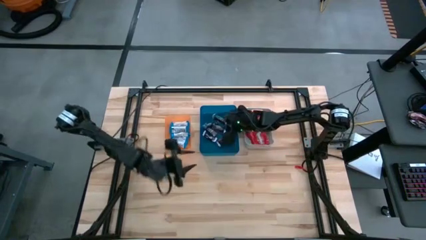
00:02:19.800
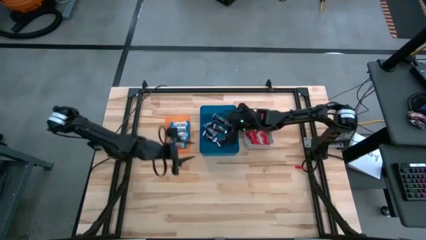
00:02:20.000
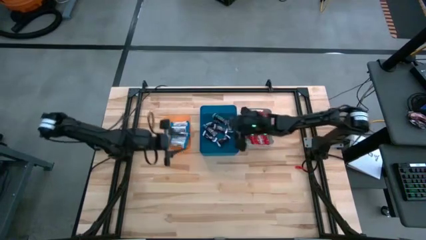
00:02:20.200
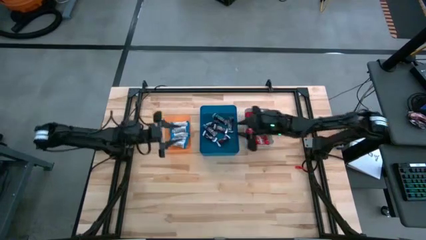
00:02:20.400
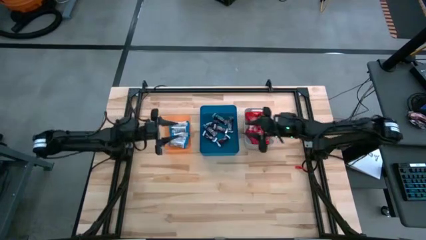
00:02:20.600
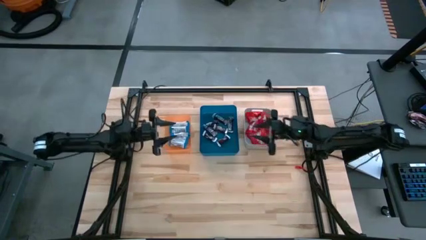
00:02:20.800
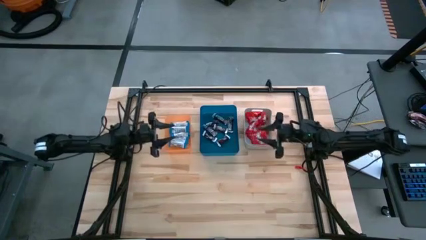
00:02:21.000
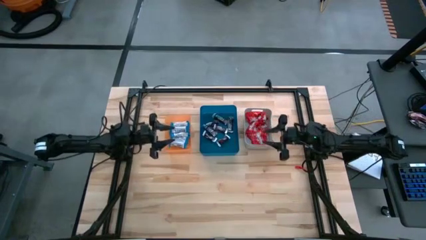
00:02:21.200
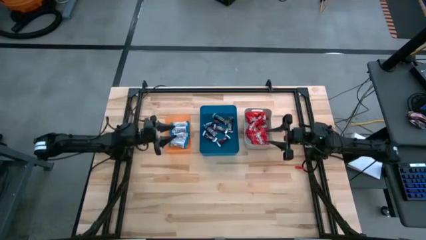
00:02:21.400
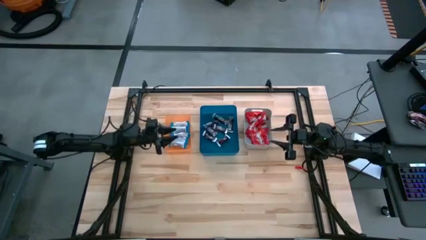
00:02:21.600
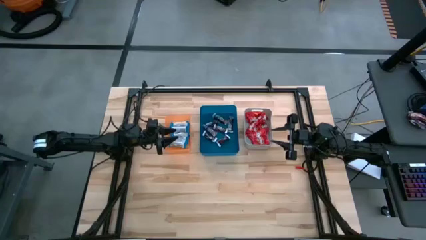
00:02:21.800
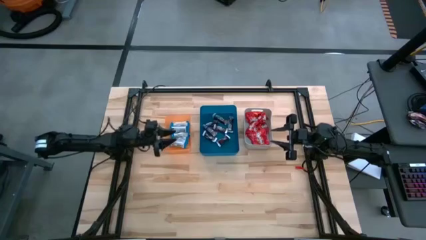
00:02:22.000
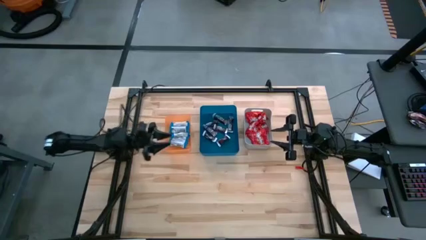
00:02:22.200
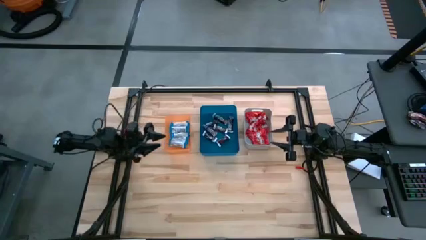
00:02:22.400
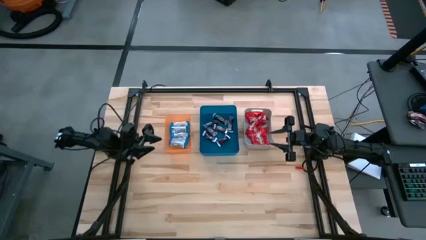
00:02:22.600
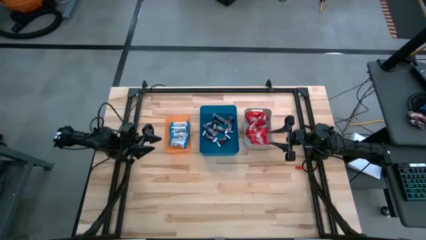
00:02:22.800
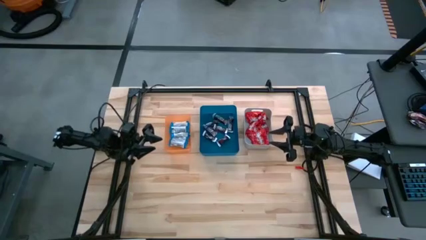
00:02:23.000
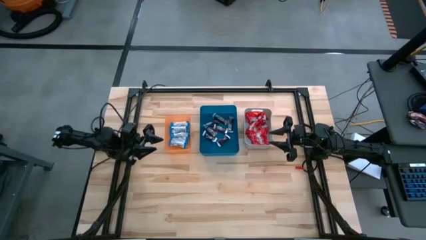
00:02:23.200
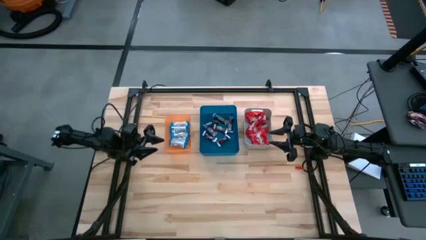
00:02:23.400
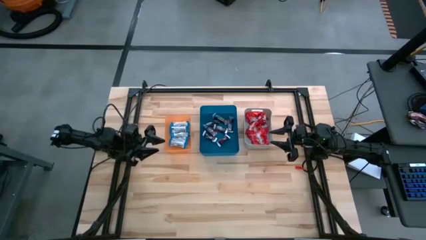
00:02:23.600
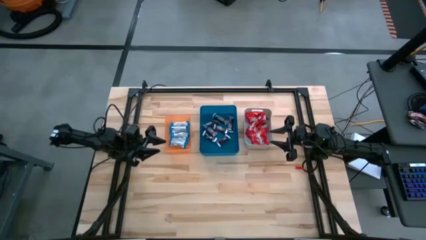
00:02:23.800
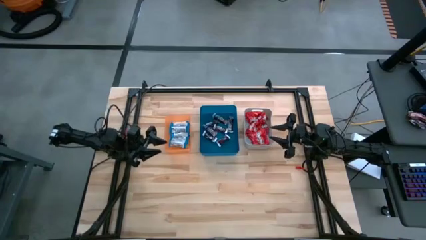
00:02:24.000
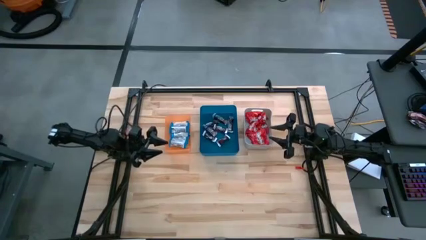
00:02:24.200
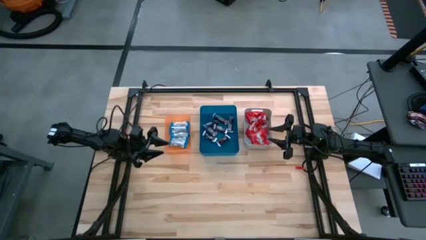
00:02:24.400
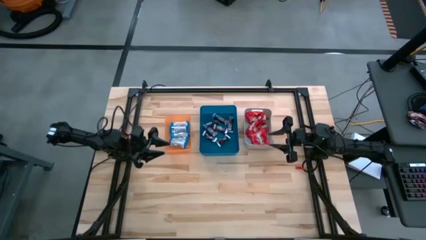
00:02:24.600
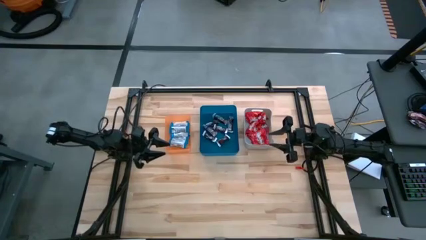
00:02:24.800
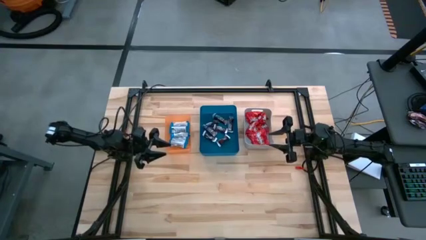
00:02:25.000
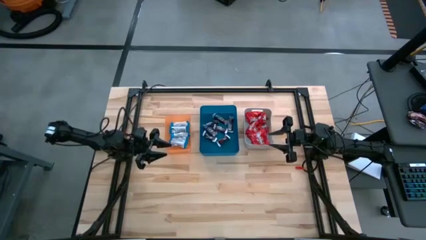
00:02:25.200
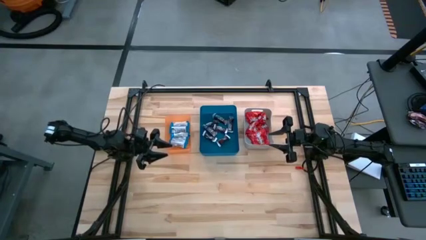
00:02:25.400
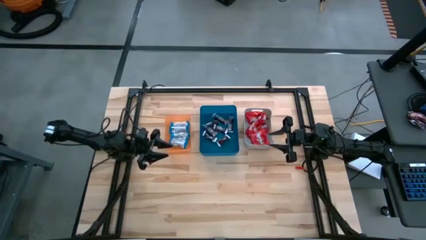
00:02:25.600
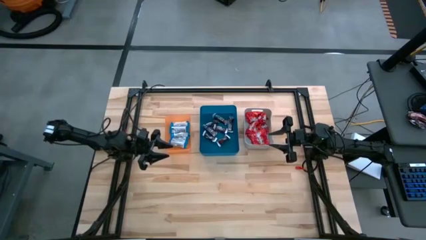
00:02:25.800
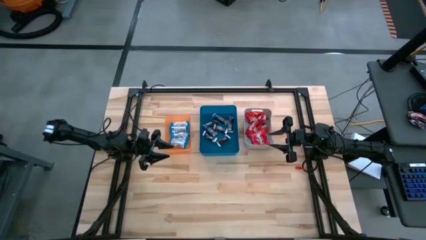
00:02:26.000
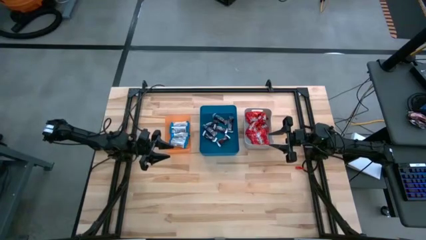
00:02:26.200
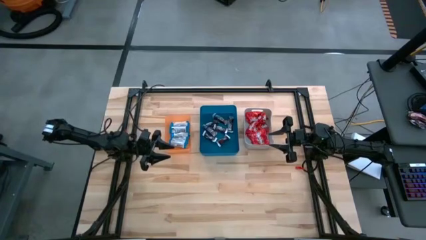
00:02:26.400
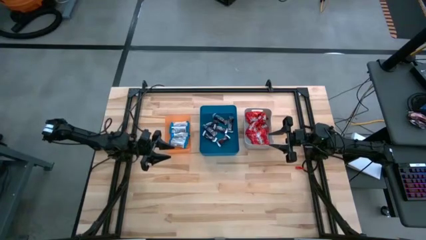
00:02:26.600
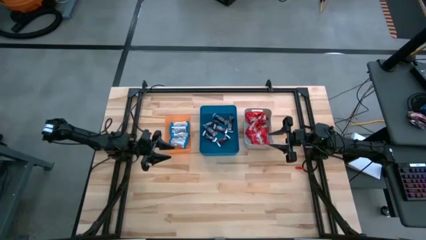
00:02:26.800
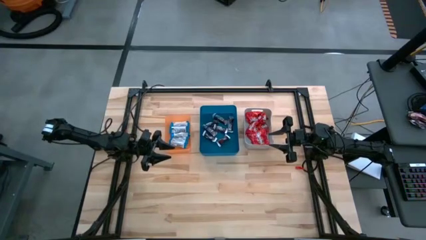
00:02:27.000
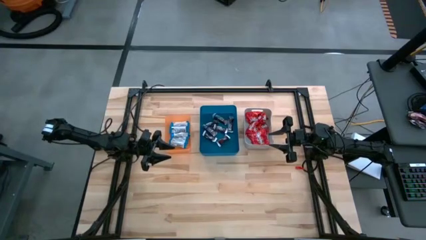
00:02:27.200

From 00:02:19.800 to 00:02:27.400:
Task: Sort candy
Return to Home Position

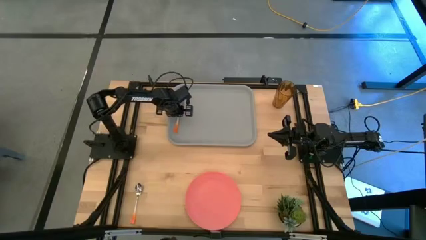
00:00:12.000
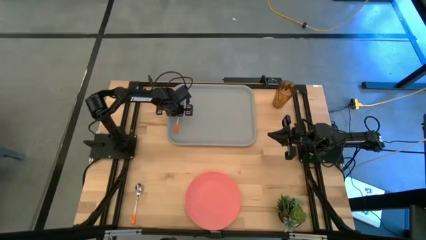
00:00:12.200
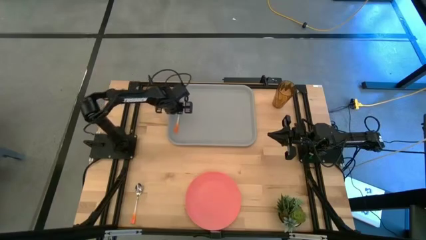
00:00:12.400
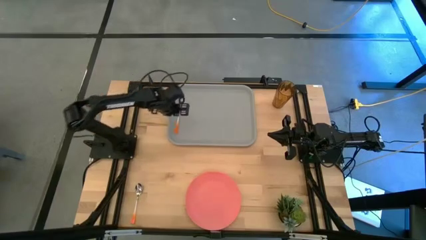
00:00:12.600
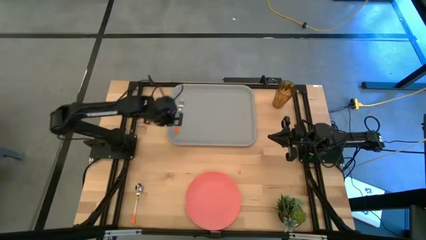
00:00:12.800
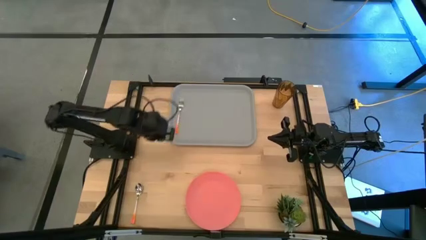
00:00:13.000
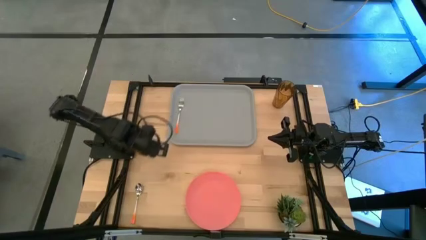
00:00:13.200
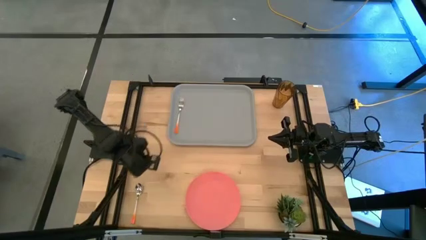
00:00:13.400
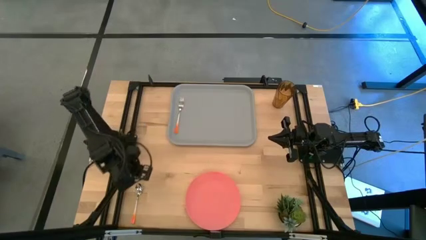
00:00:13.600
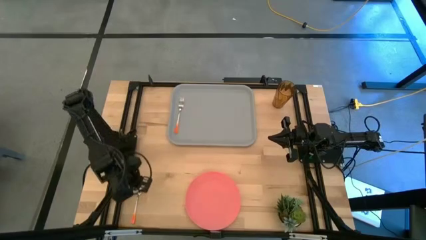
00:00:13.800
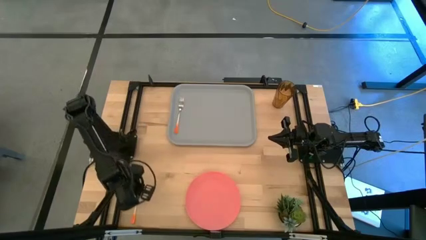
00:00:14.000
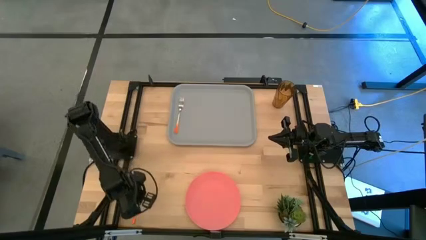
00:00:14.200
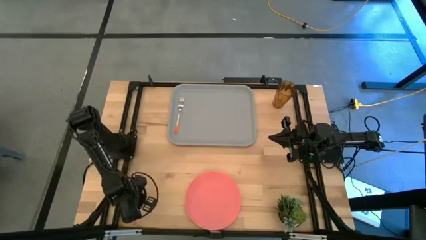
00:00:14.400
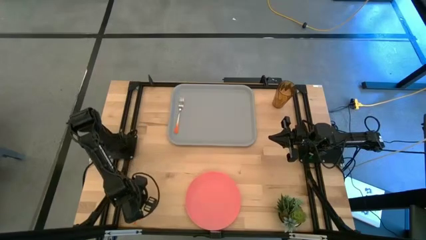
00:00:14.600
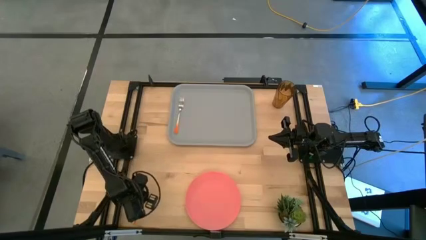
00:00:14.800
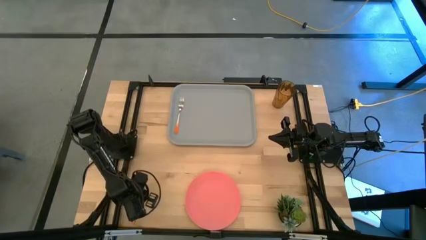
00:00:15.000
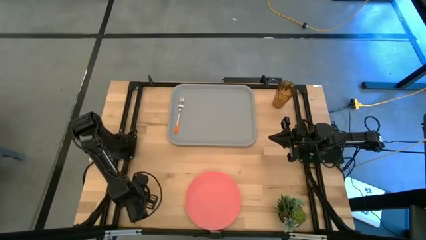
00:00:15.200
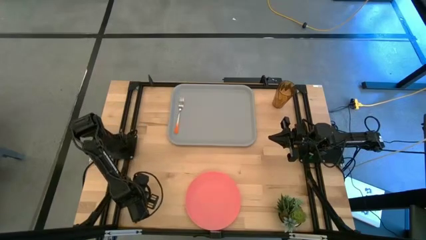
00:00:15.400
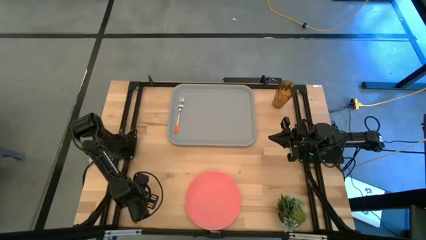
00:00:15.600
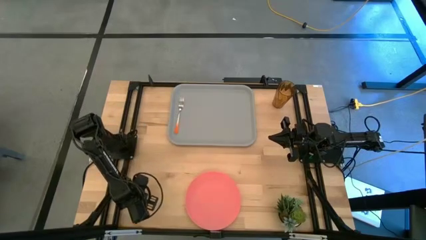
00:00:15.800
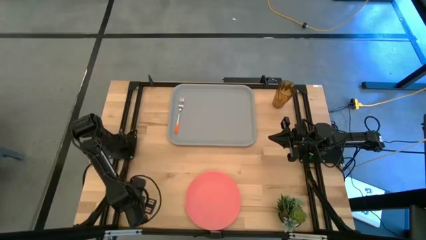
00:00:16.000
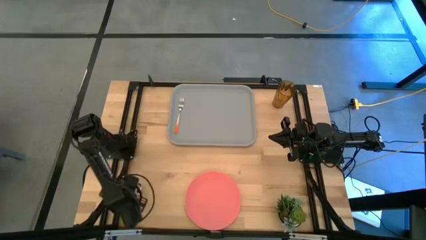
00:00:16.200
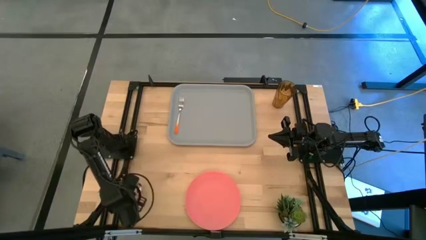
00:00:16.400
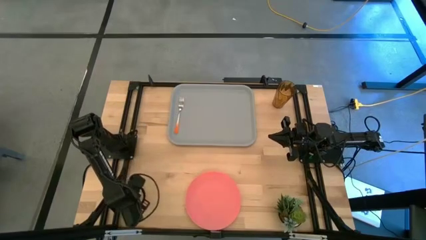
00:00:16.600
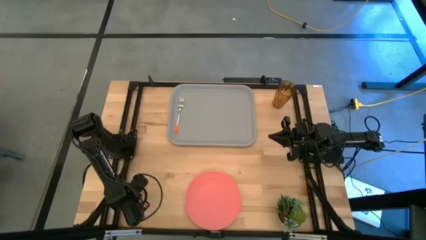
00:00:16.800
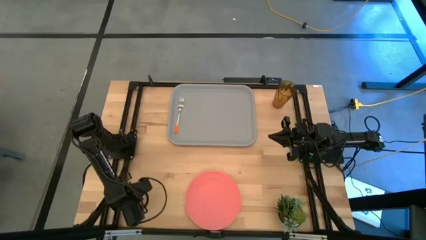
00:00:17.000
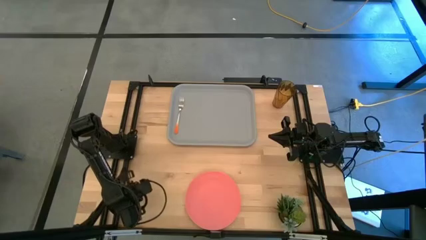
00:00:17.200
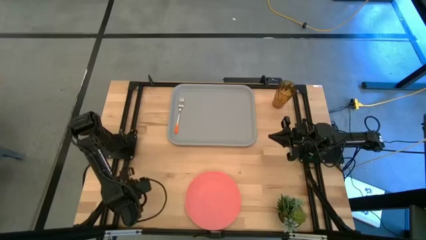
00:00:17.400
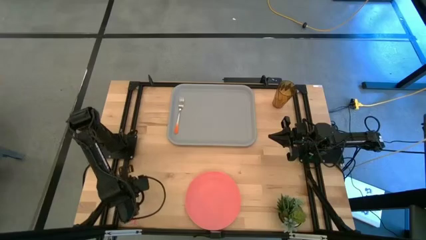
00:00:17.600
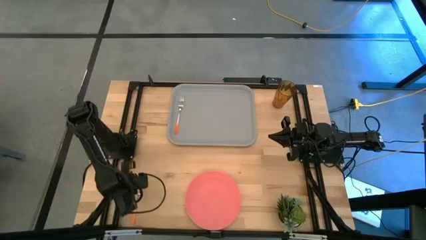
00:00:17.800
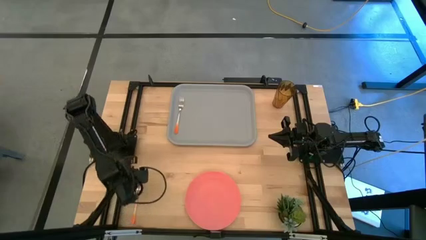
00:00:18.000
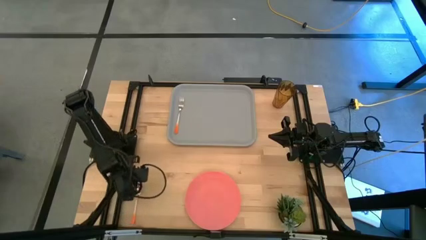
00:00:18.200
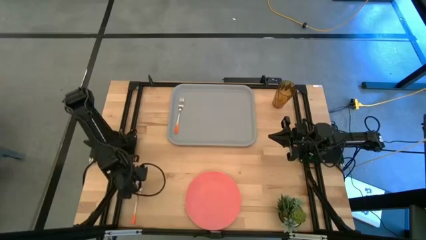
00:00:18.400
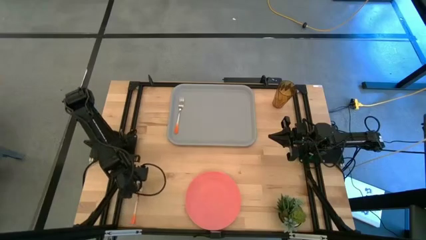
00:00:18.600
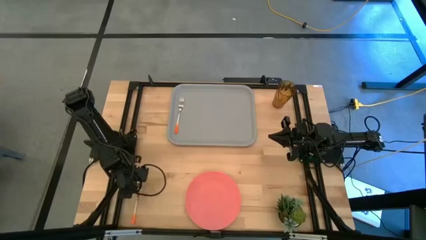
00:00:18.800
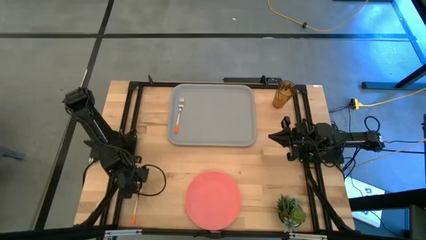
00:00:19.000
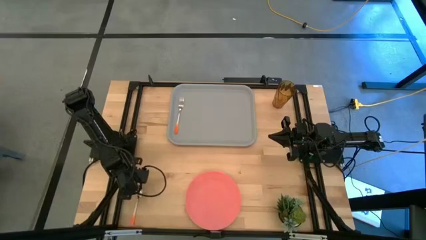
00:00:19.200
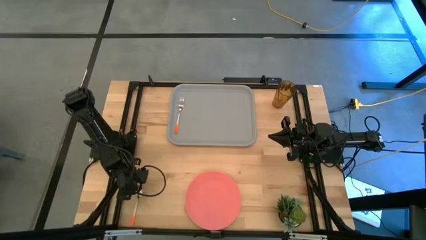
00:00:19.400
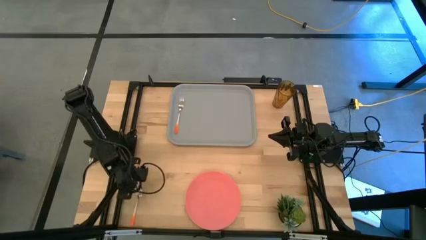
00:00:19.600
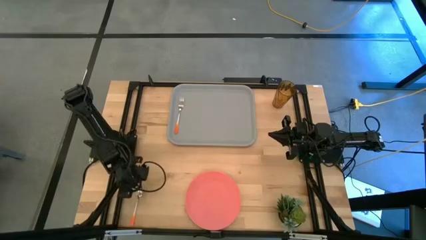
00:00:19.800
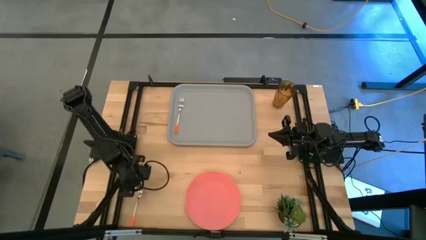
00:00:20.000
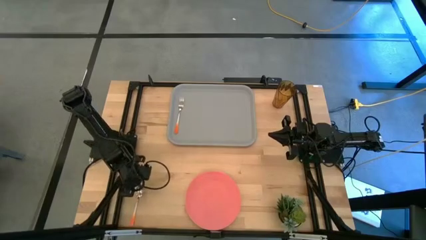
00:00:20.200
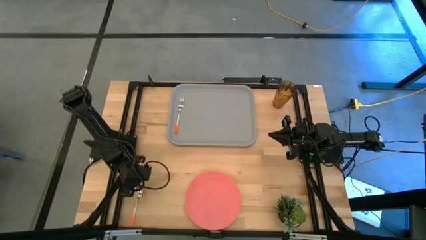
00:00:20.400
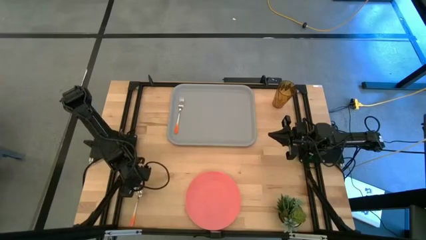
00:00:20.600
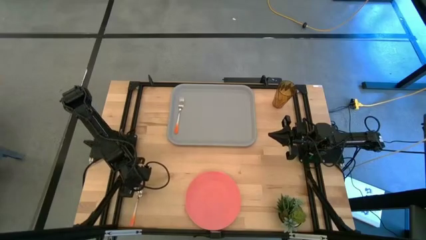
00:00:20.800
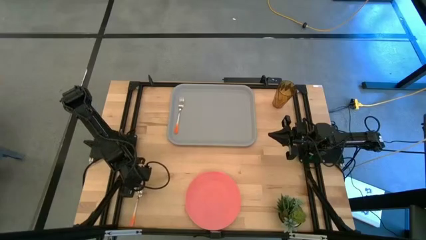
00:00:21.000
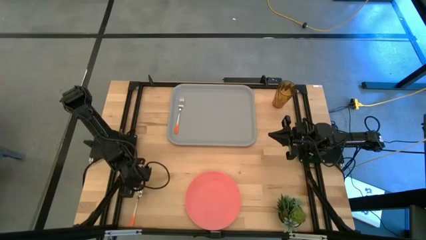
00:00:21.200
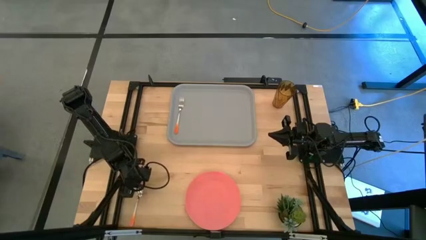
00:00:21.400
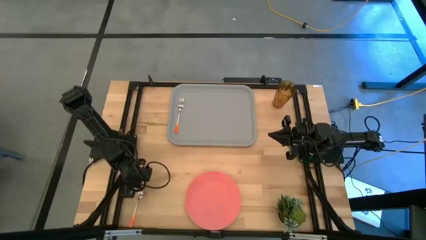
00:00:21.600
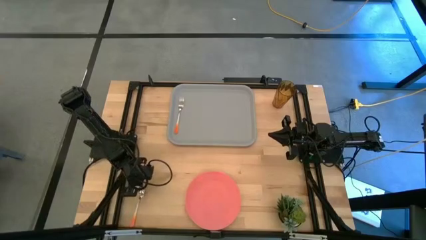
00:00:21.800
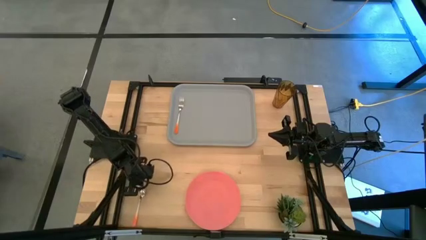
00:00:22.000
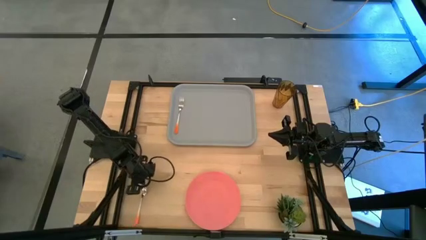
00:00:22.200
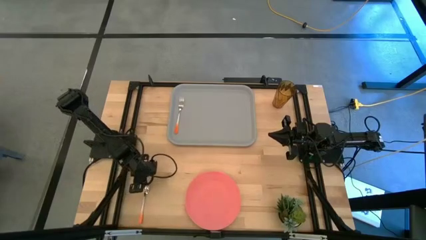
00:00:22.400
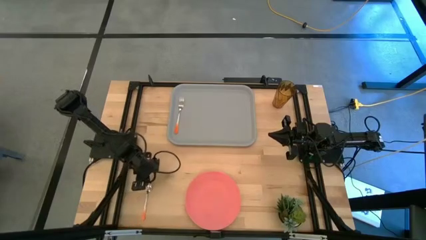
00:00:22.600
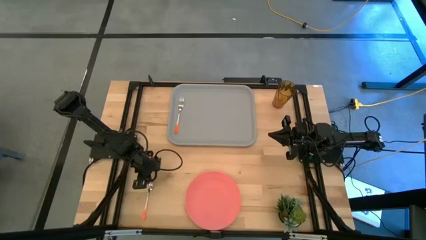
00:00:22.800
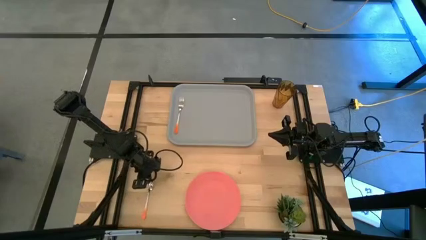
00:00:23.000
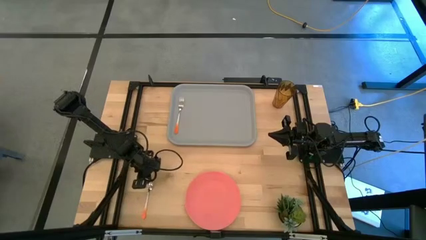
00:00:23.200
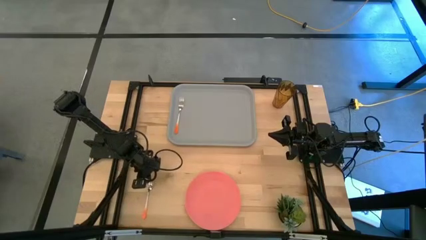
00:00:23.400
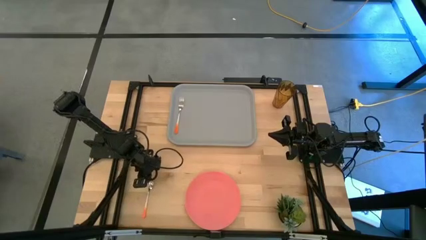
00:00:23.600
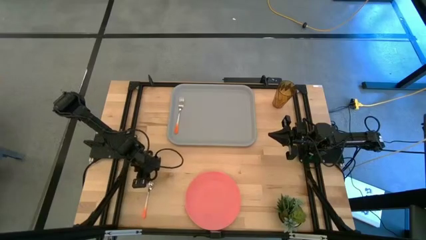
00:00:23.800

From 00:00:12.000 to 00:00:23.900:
Task: Pick and place plate/cup/fork/spoon on tray
Put the orange spoon on the gray tray to the right side of the orange fork
